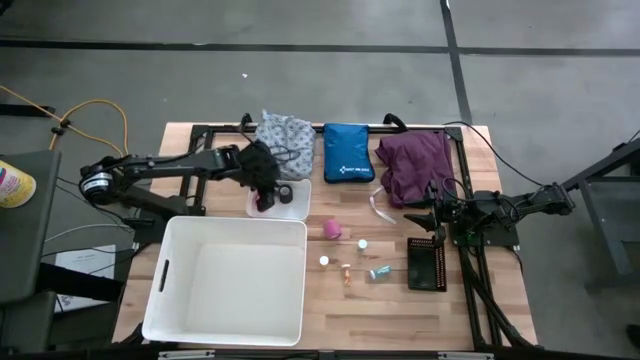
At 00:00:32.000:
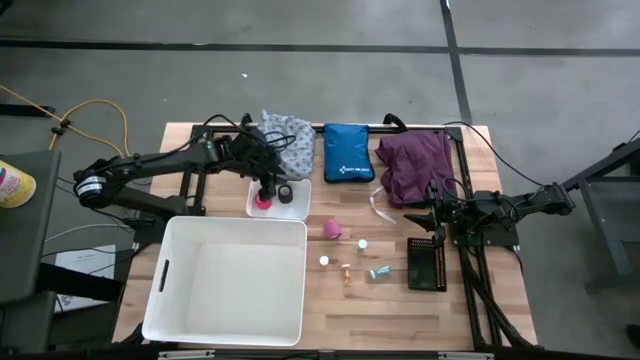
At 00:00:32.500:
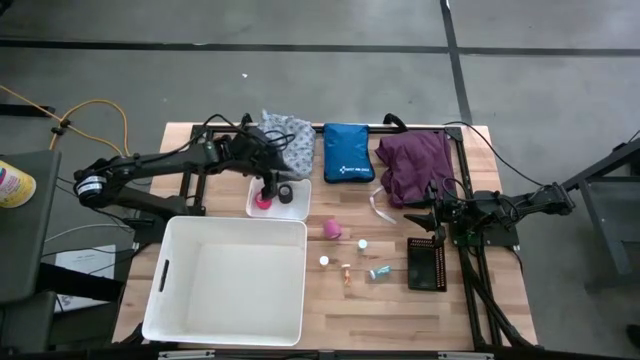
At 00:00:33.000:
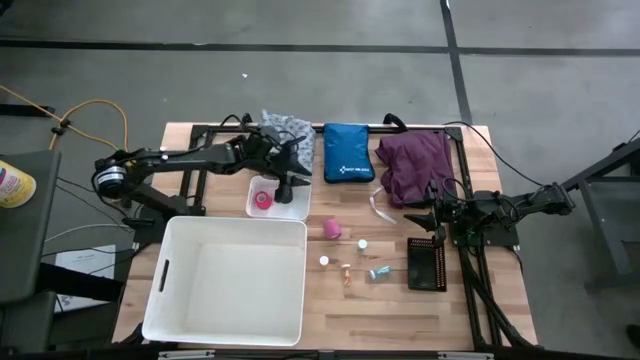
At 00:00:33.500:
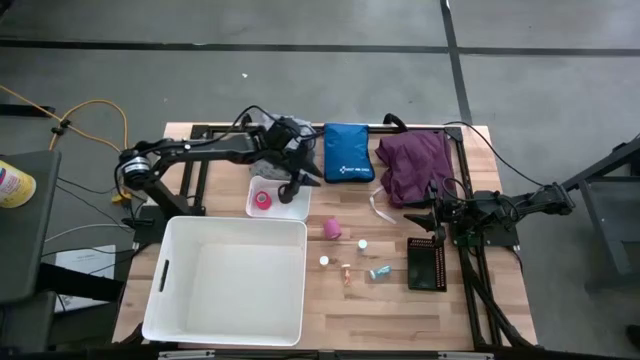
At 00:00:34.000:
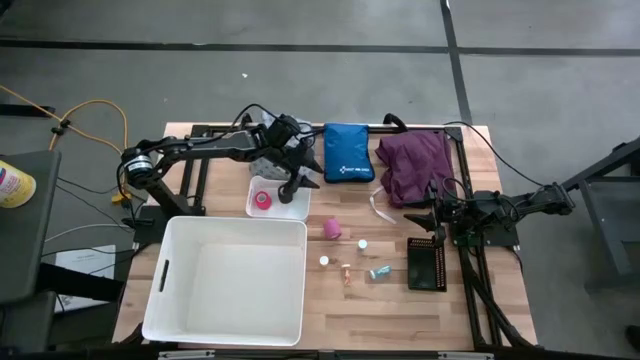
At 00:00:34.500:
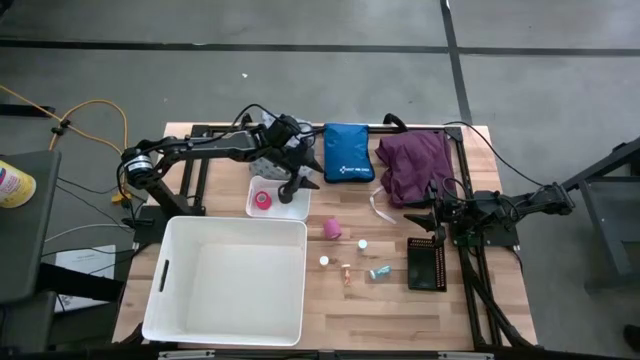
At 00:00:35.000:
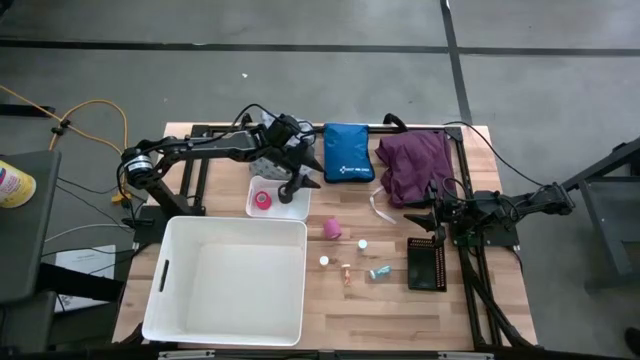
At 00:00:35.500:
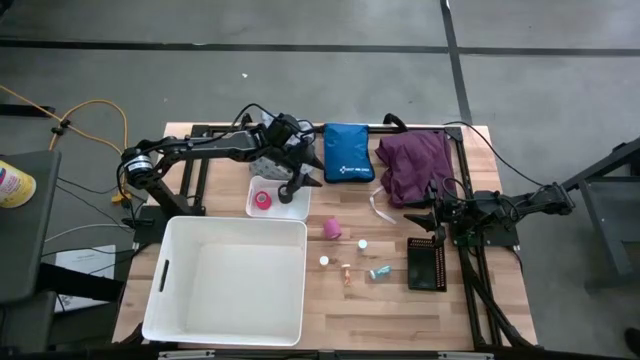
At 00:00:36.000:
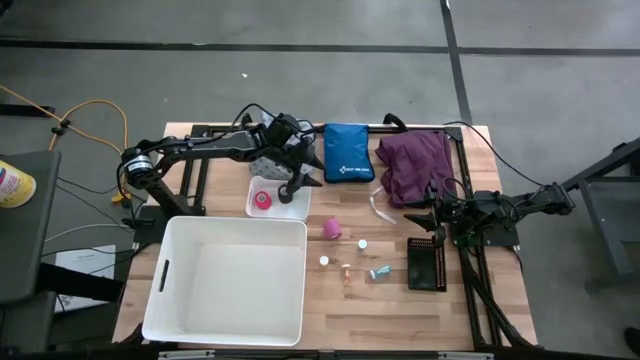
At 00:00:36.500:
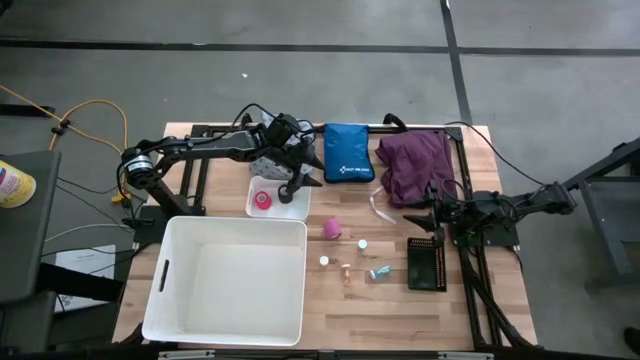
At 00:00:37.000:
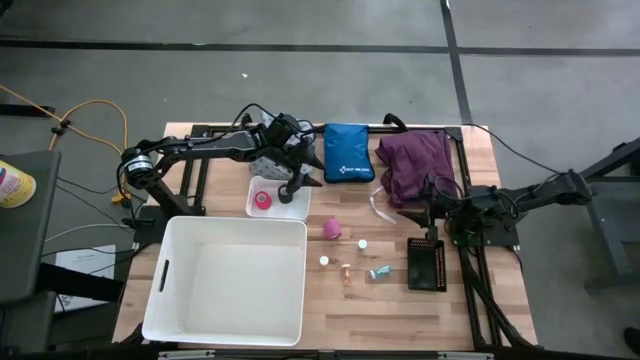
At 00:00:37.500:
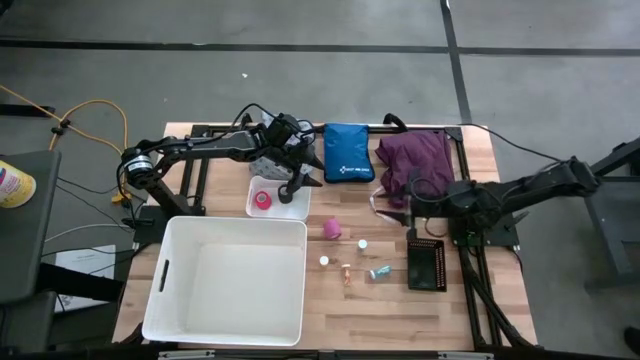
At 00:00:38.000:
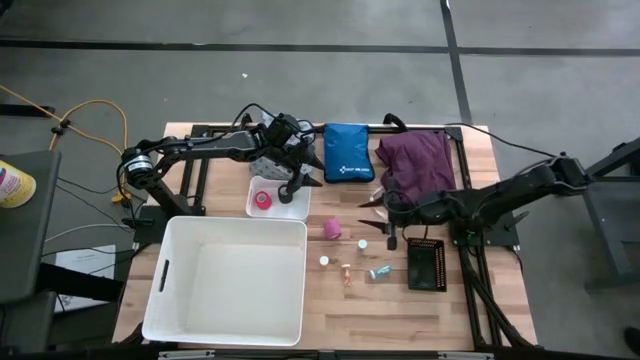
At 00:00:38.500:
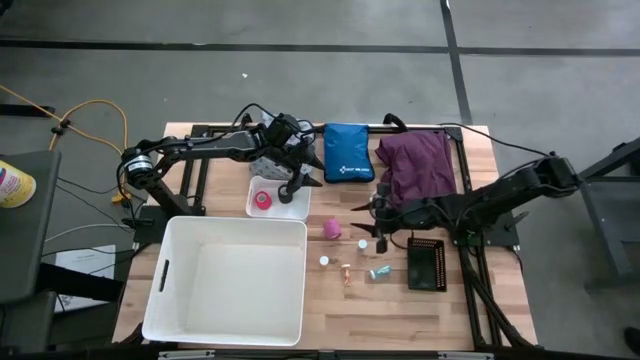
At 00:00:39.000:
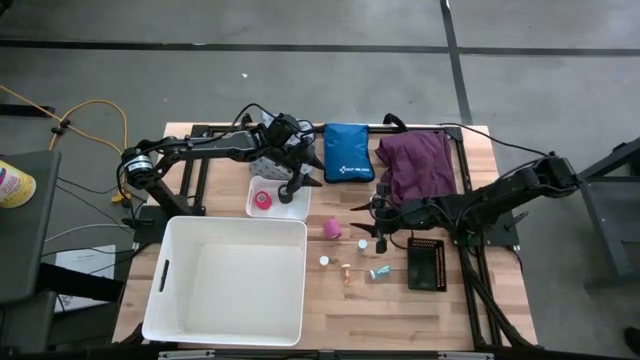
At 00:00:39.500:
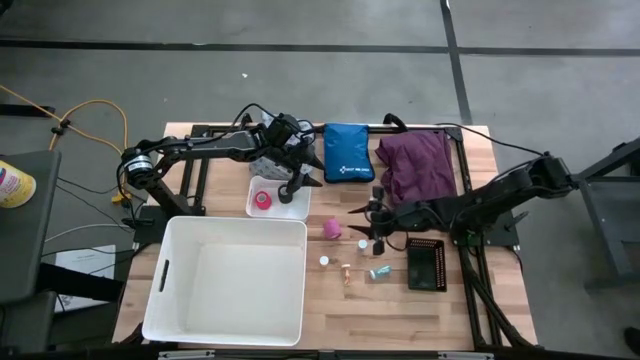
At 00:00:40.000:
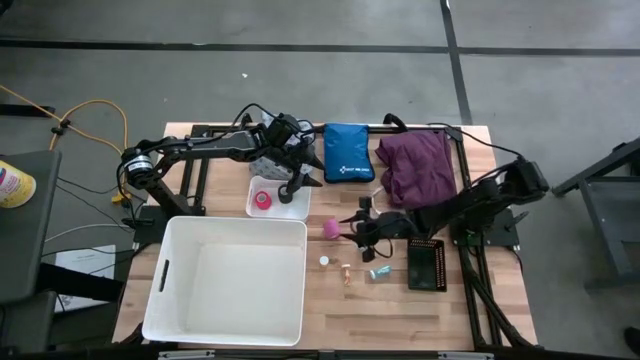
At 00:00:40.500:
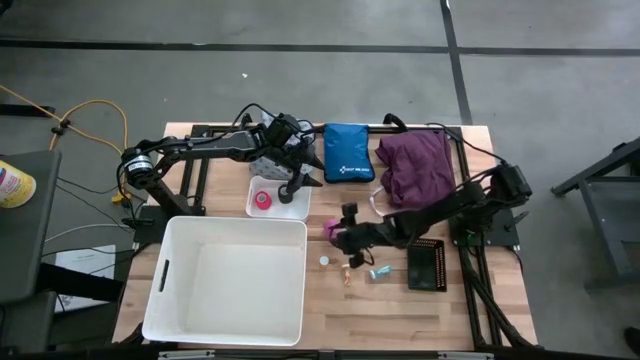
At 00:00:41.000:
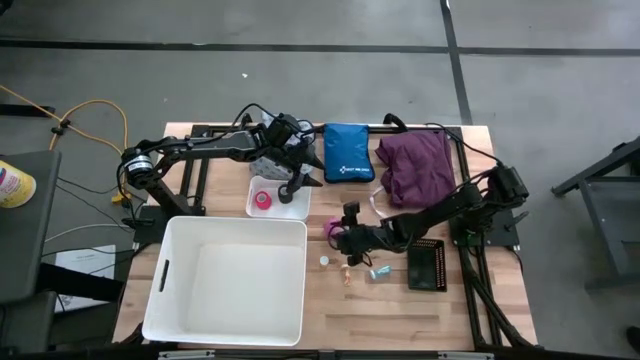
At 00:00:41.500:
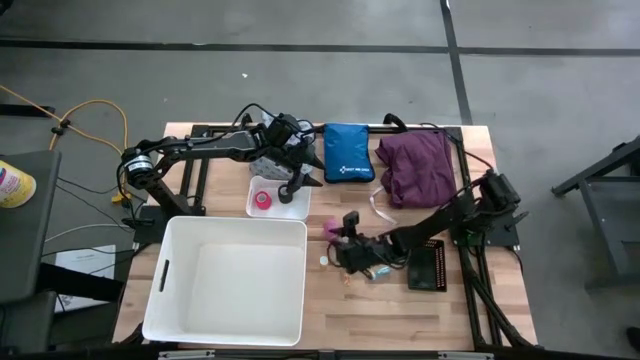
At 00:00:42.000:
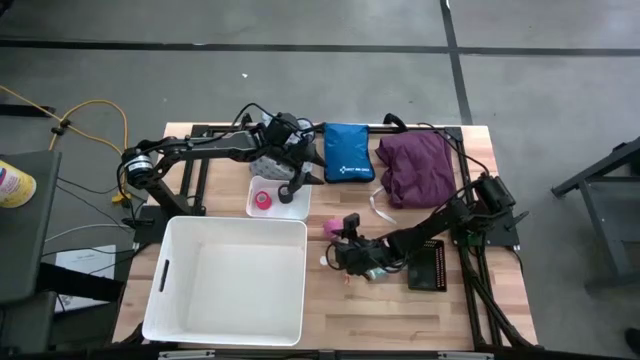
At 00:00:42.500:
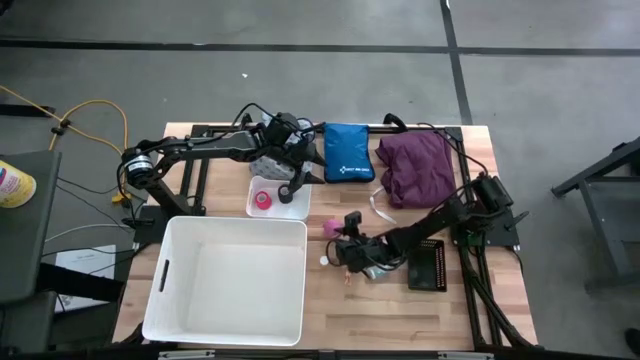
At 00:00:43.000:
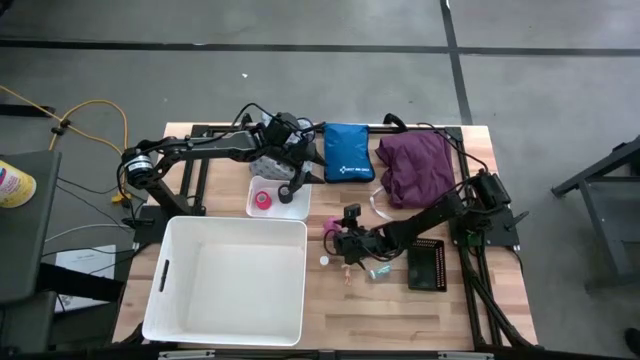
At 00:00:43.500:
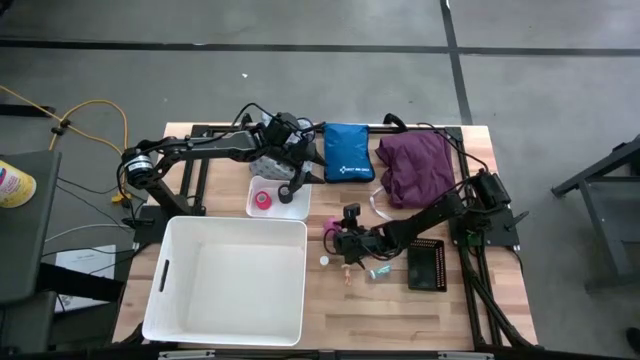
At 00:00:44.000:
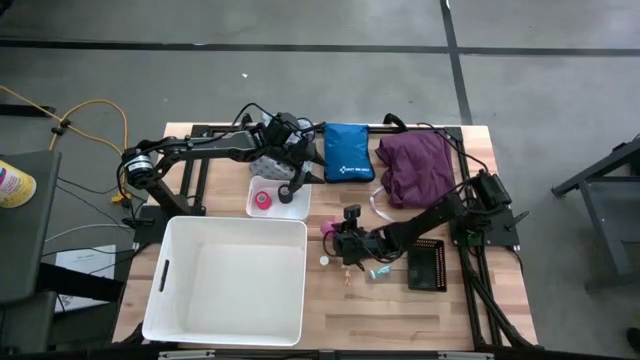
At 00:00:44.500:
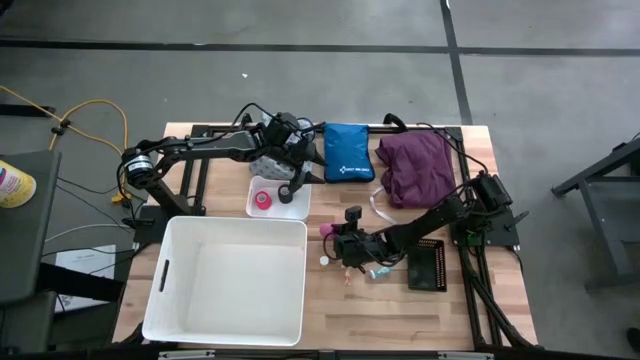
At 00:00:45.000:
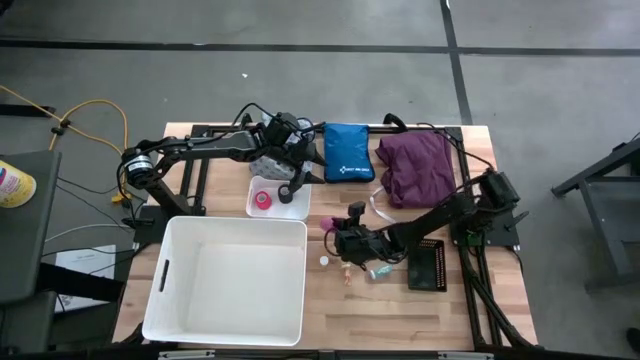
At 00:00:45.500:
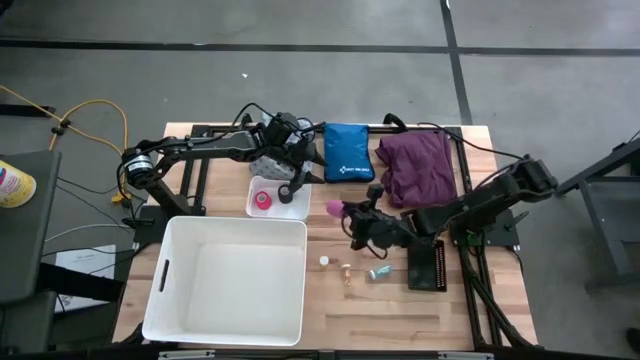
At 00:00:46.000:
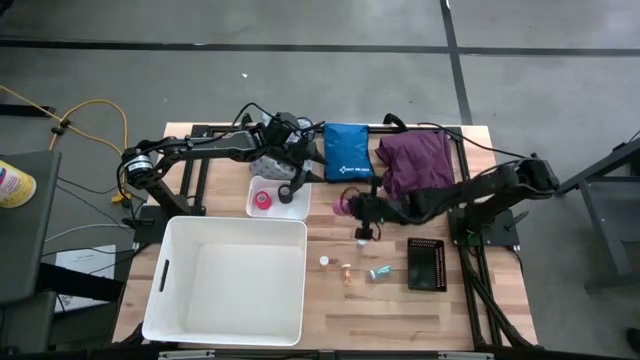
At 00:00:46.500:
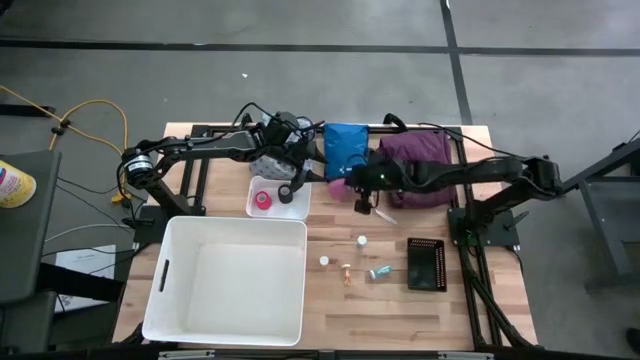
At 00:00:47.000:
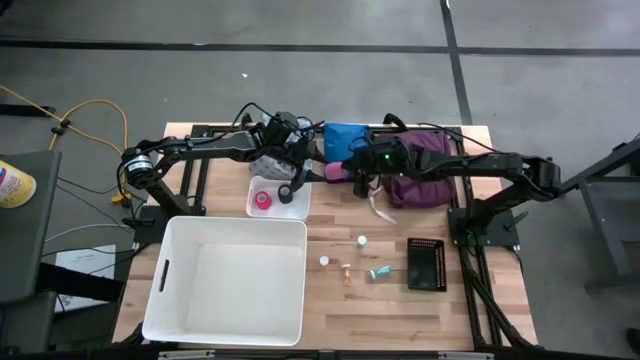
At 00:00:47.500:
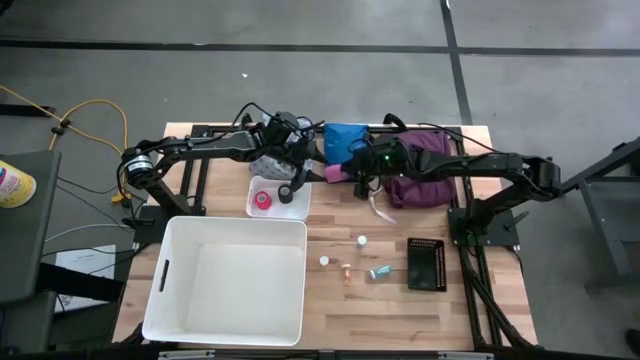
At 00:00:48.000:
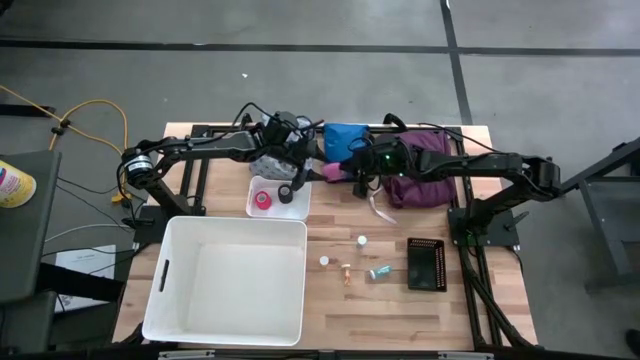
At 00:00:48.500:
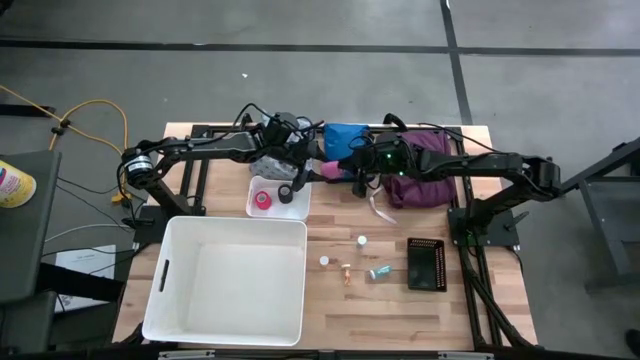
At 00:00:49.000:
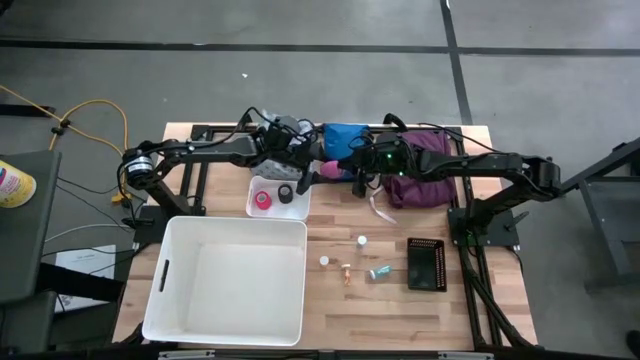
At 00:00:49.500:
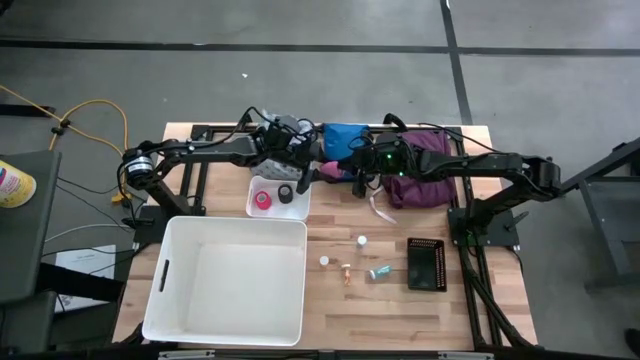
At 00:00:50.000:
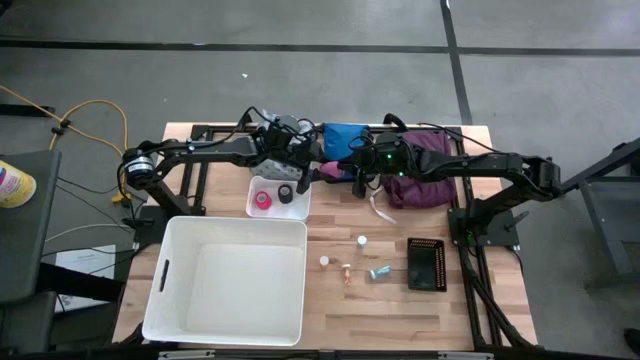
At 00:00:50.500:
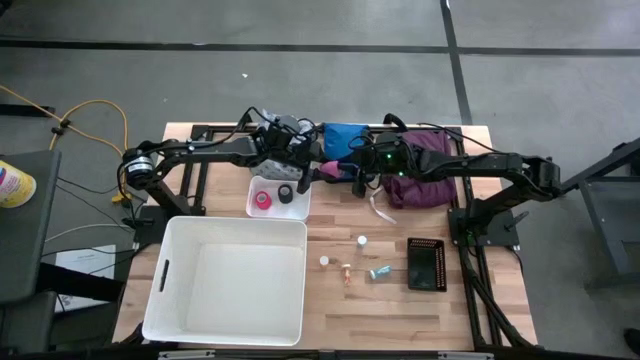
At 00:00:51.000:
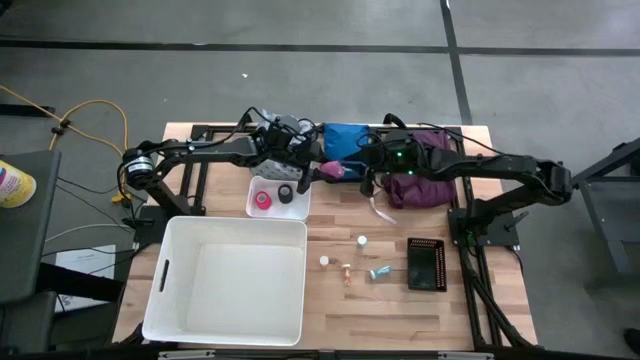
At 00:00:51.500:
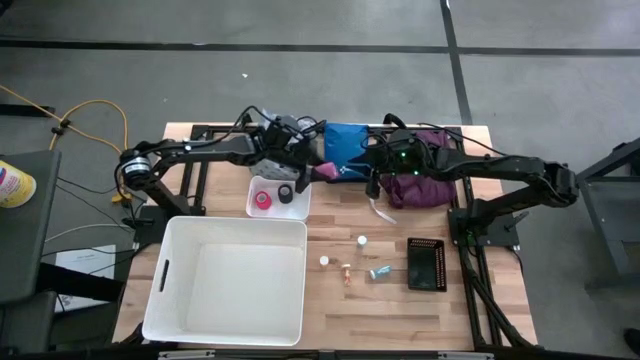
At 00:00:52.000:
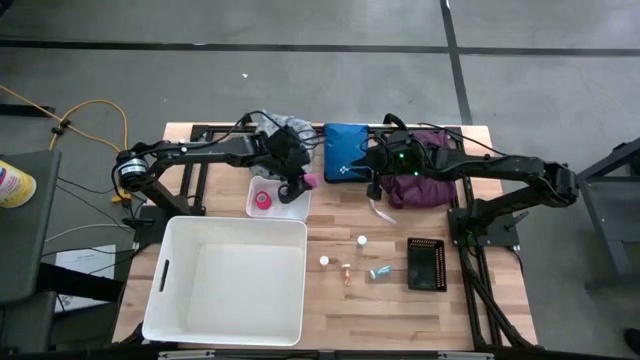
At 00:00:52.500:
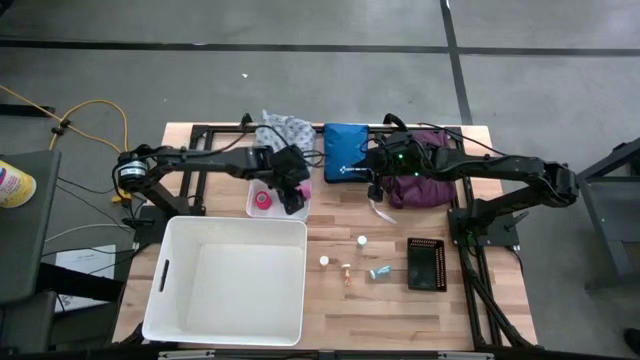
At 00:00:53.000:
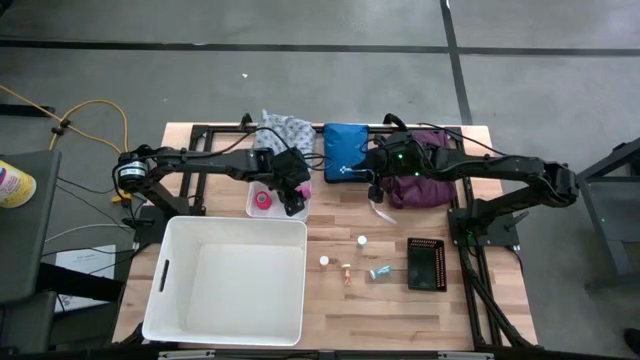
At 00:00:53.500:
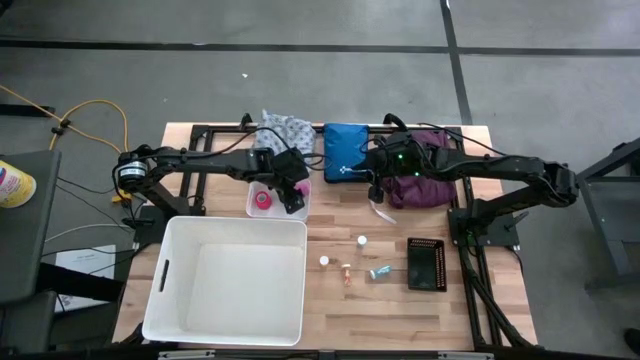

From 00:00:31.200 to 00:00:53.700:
Task: Pick & place medical supplies in basket/bin
Put the pink bandage into the white bin
